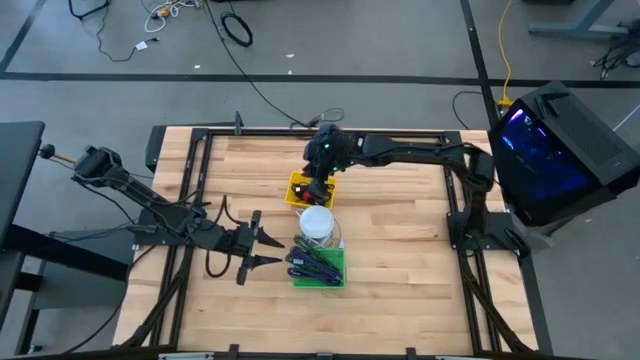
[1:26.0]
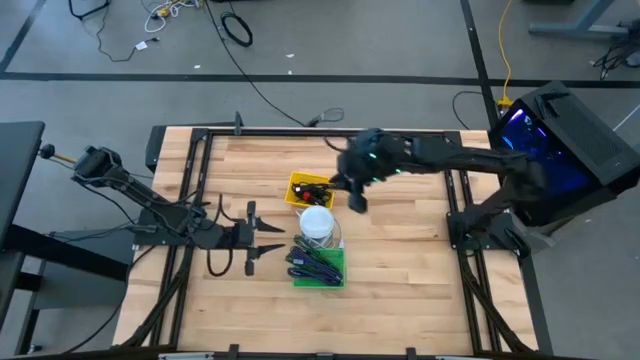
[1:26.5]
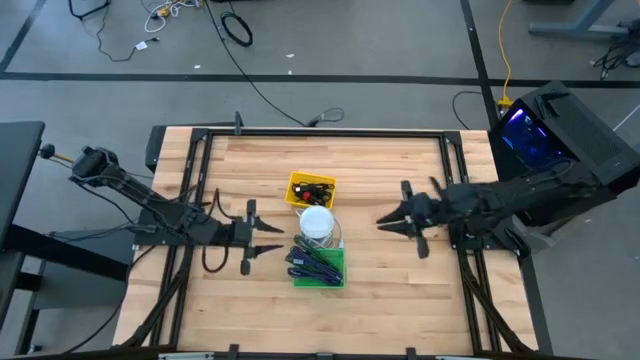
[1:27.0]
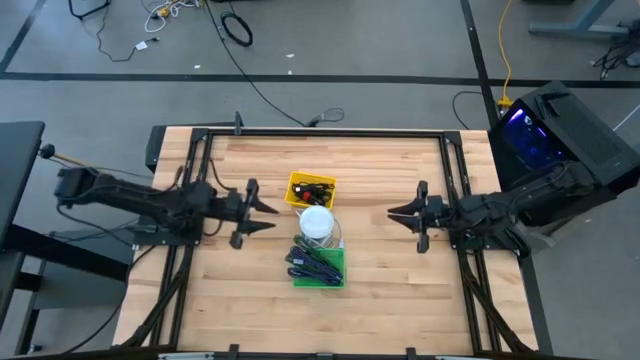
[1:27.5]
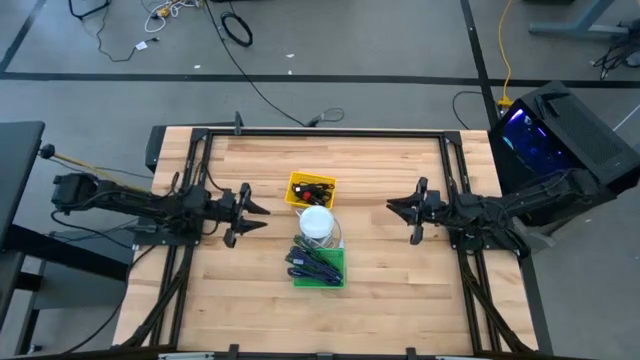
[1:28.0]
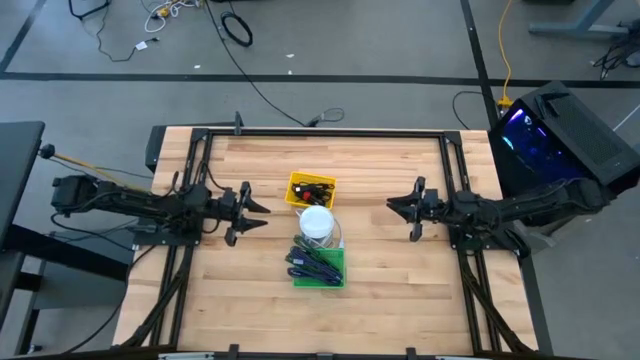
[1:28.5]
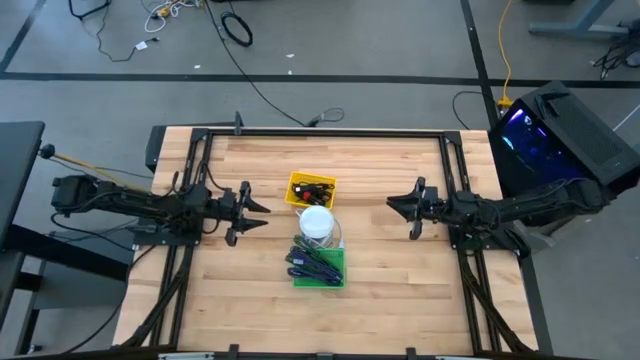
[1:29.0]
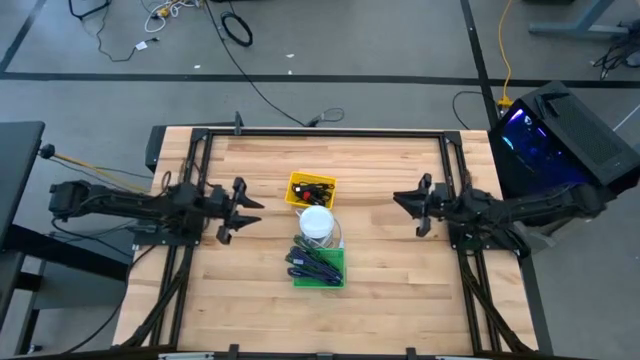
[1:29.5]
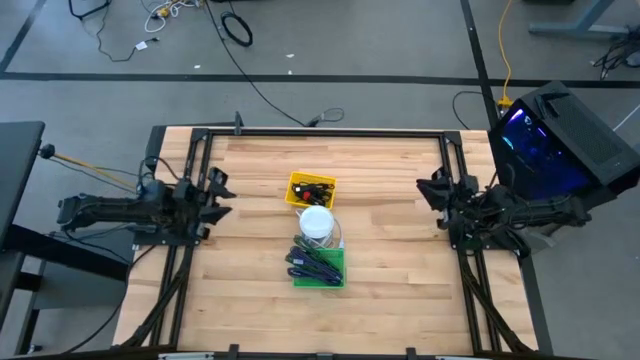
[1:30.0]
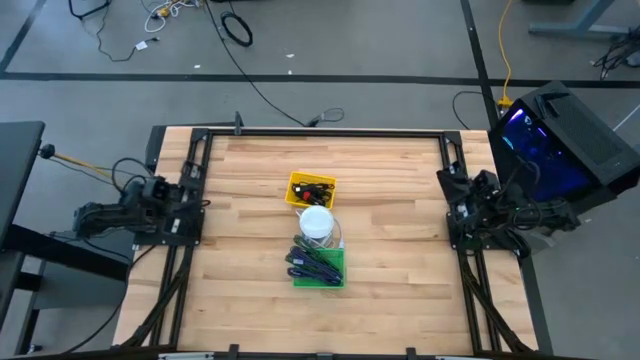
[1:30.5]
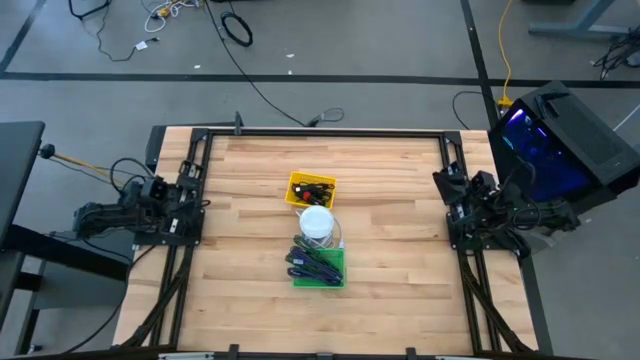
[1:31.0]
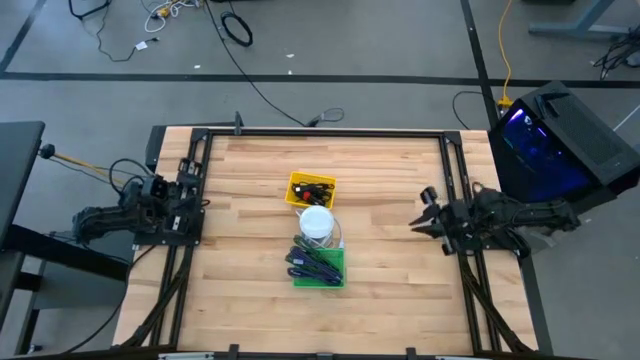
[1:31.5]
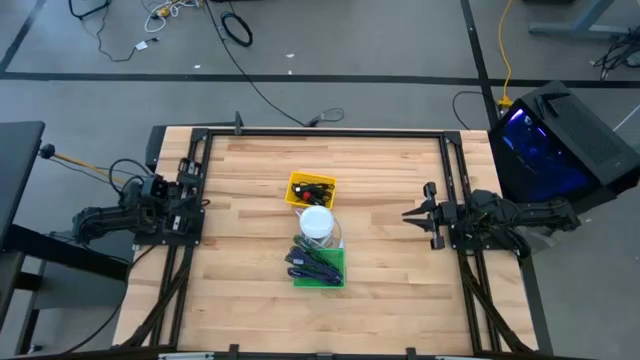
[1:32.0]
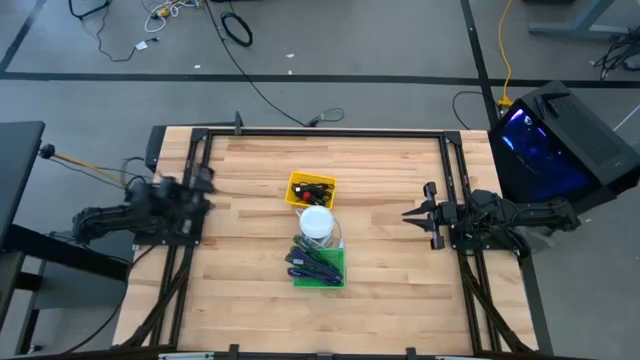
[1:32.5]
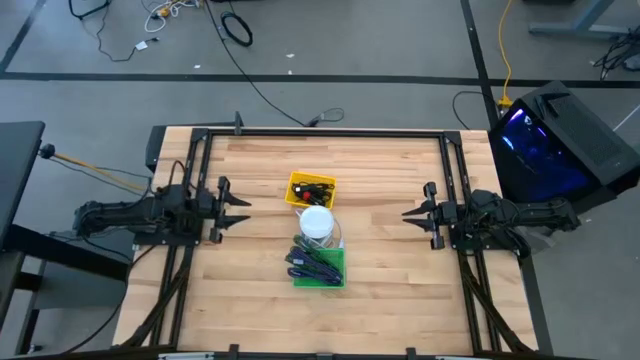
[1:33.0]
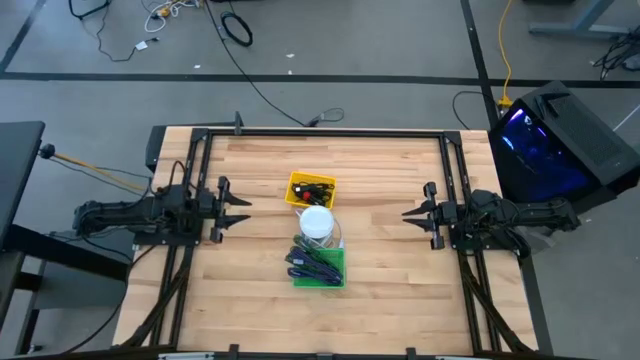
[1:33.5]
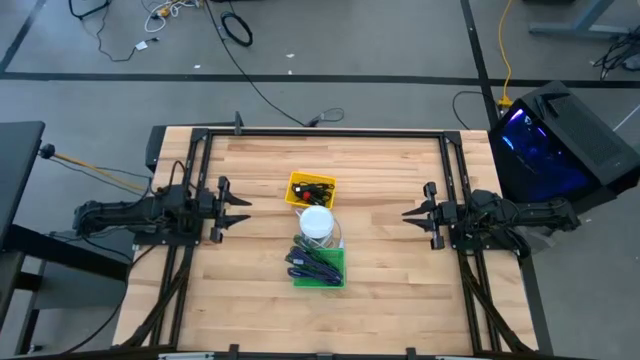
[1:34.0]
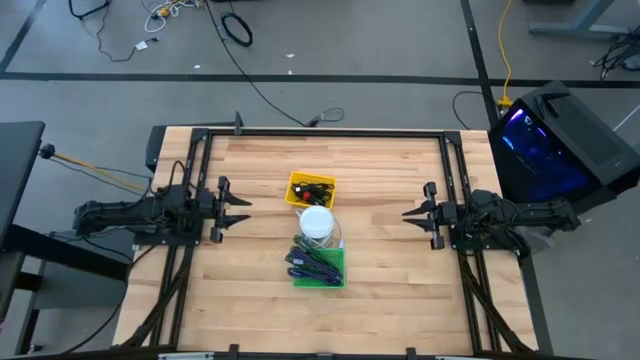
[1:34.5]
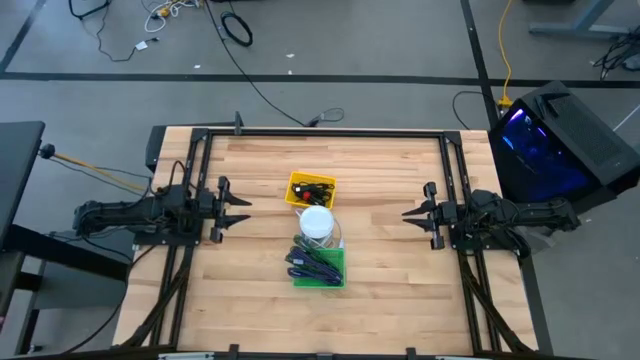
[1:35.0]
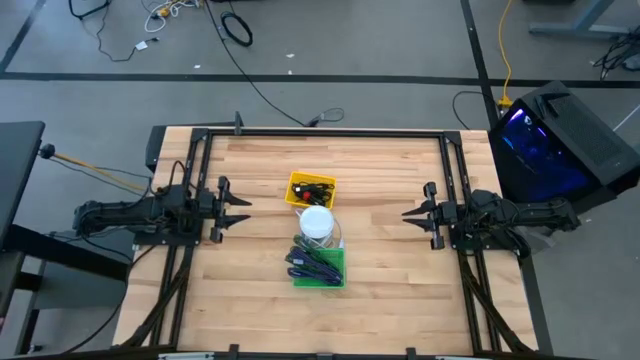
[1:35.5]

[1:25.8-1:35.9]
Task: Pick & Place USB Port
Return to Home Position

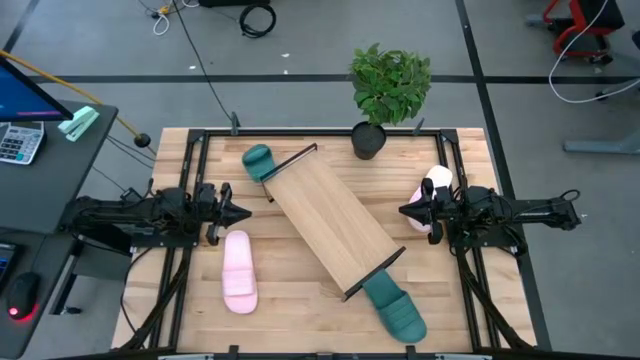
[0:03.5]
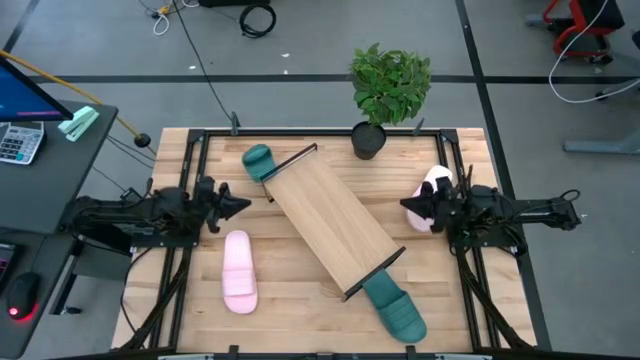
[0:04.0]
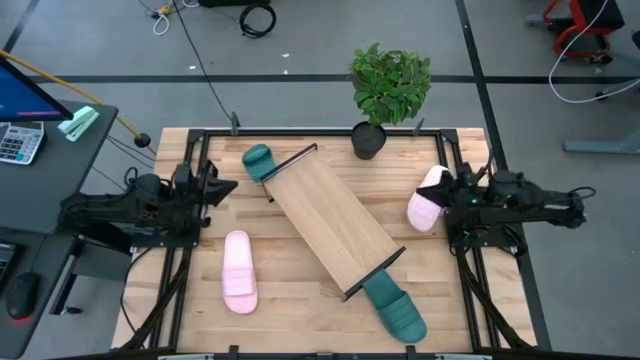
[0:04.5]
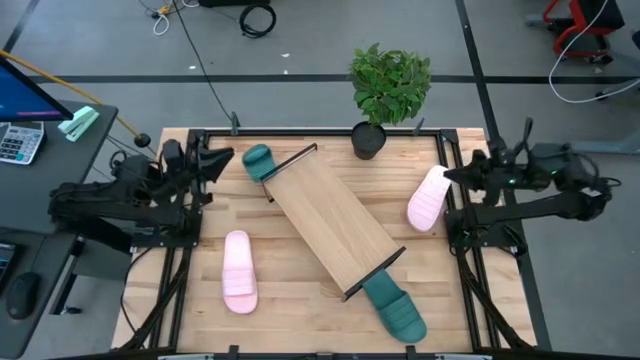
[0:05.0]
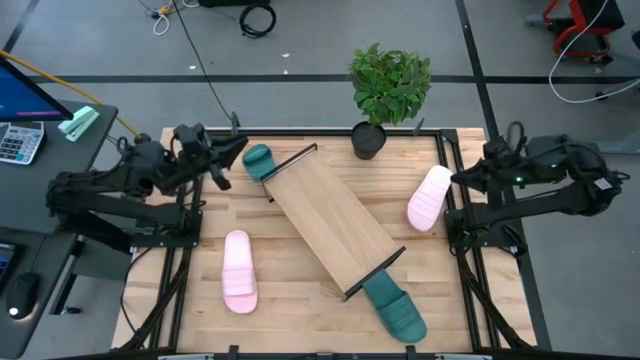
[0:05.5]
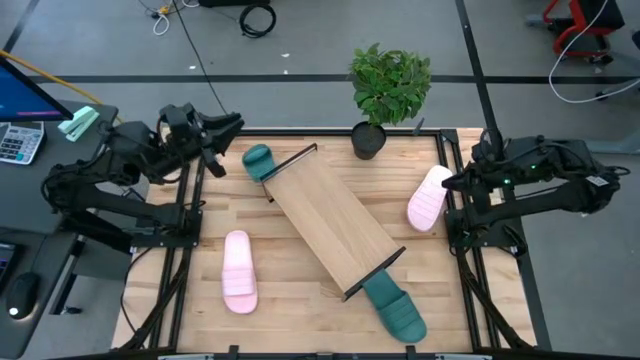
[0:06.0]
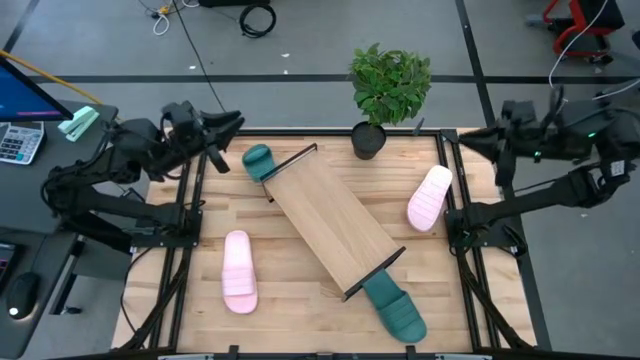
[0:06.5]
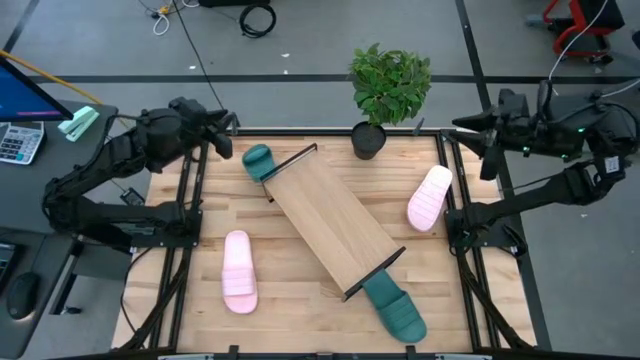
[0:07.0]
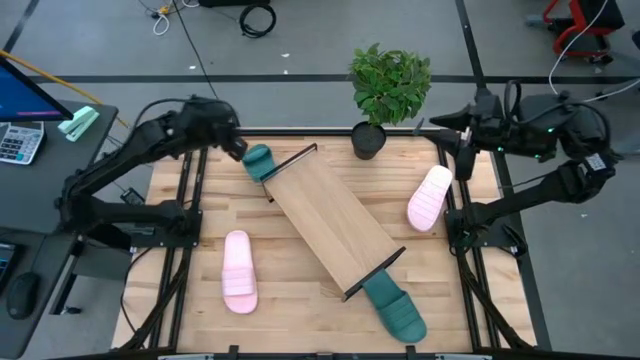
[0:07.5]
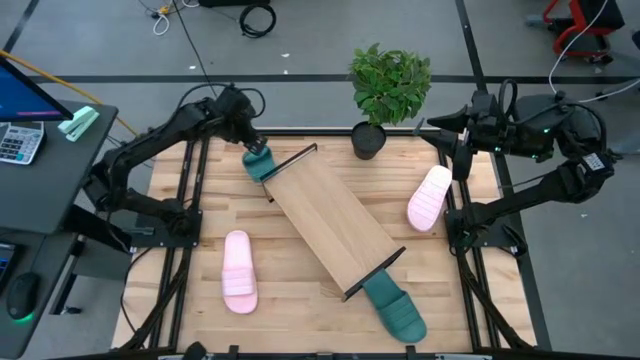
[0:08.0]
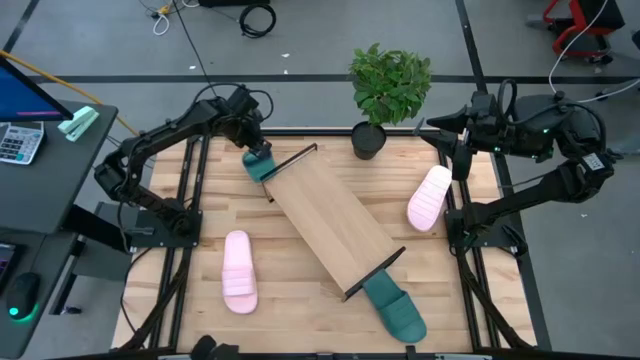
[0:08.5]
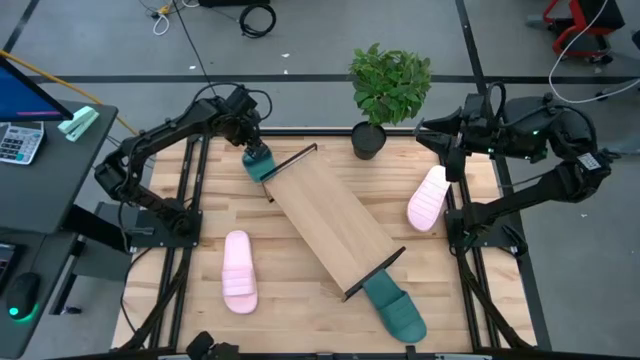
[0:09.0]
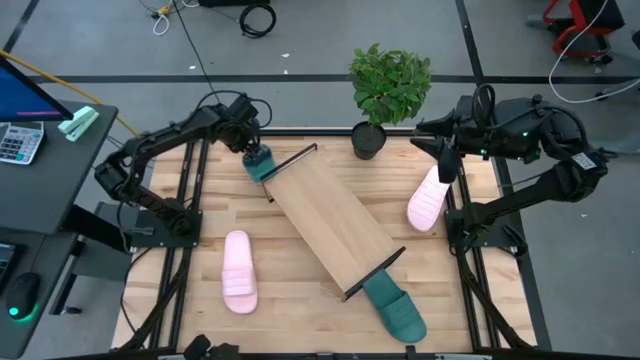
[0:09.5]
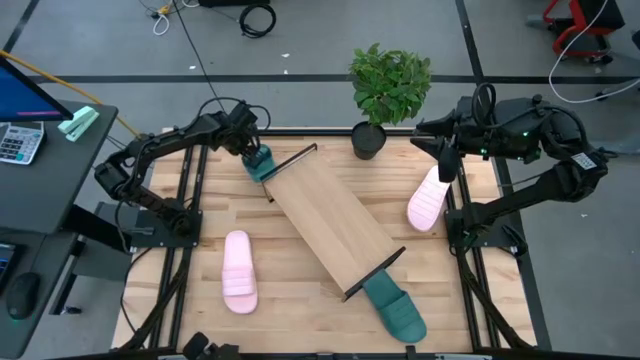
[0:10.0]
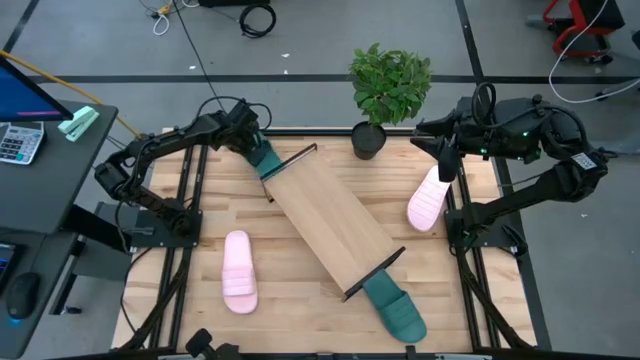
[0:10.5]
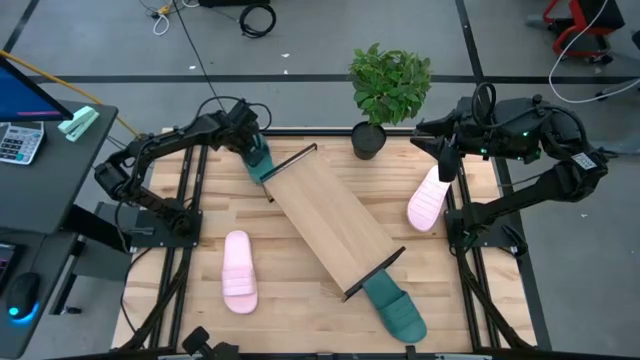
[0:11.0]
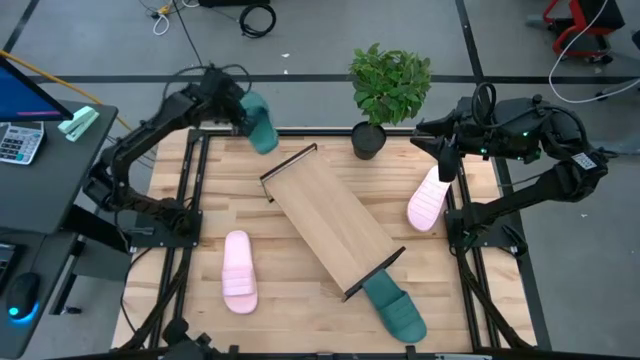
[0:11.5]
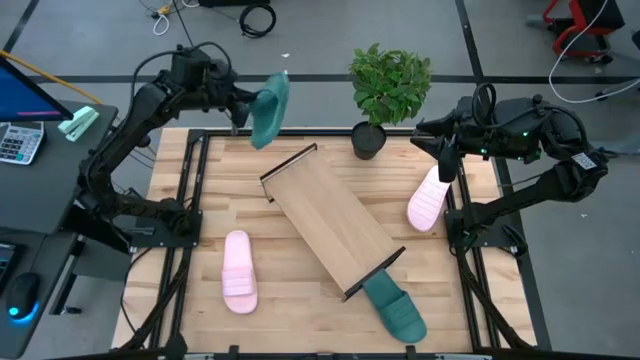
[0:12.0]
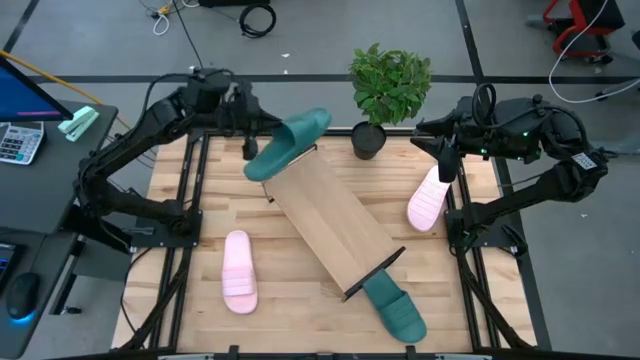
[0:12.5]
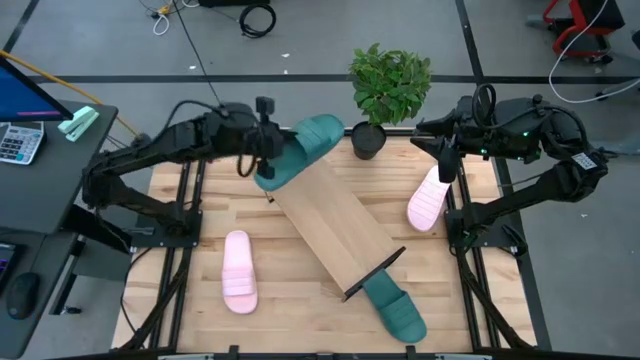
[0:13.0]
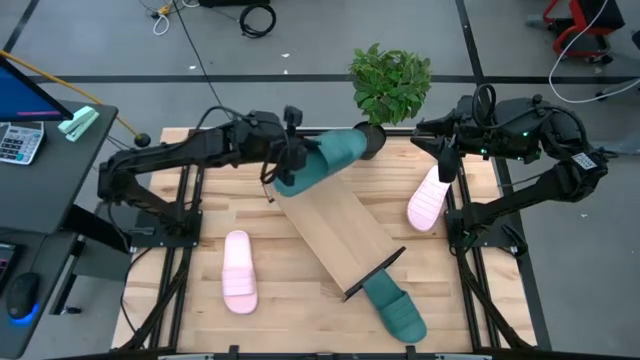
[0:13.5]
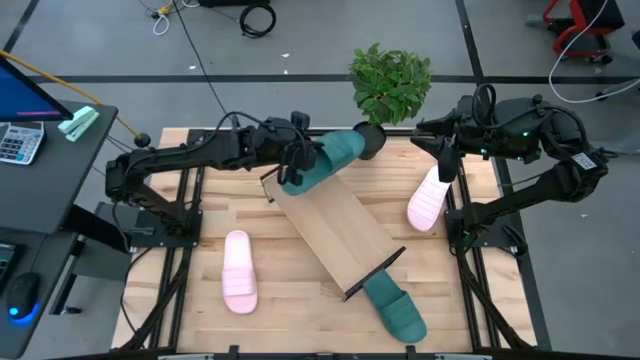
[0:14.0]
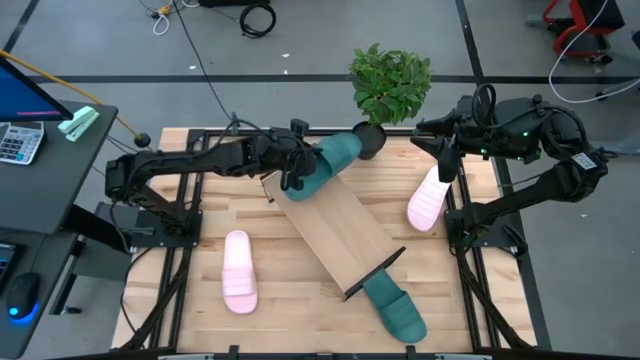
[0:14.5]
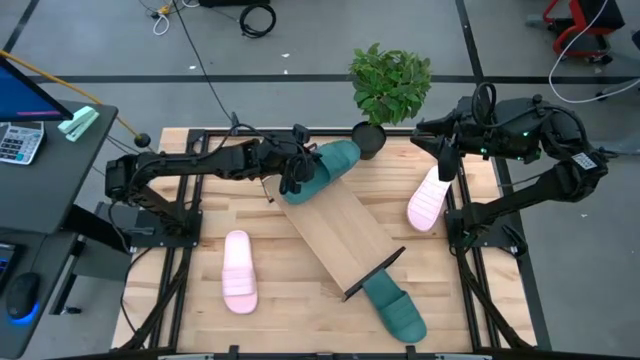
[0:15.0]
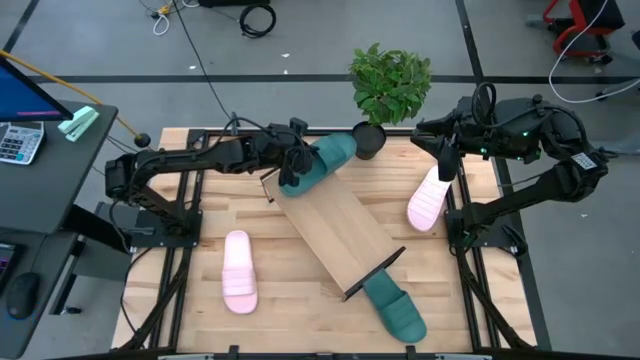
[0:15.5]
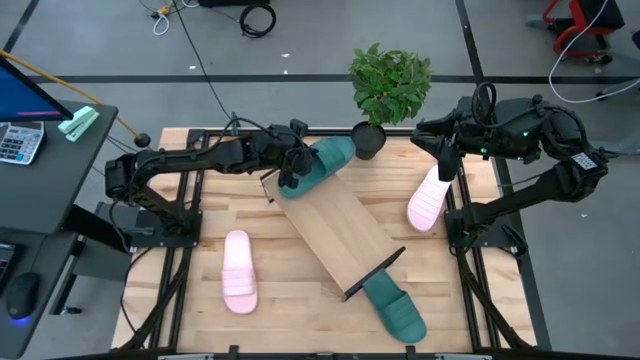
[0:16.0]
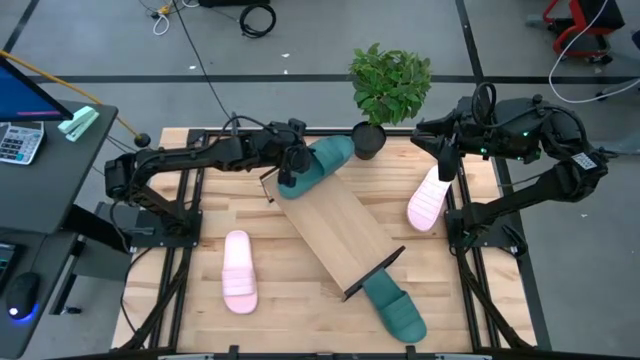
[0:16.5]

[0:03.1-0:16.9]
Task: Pick and place slides into the shelf
Put the top green slide on the shelf
